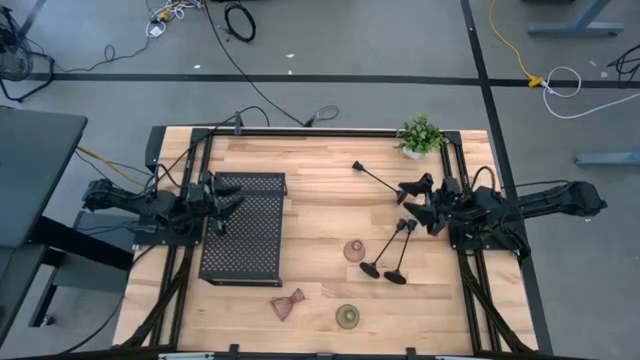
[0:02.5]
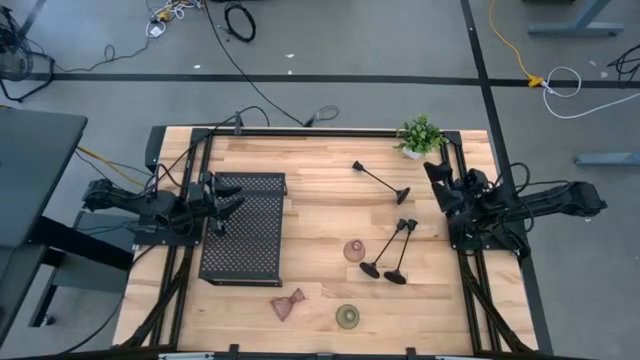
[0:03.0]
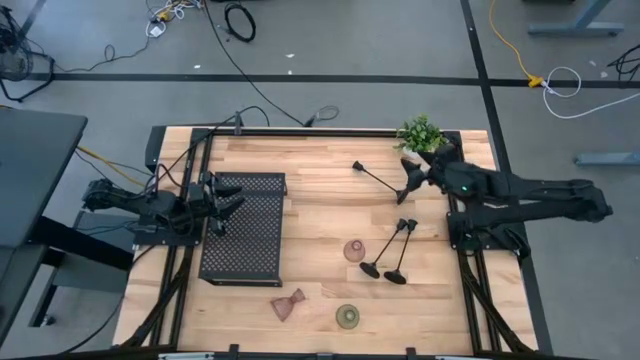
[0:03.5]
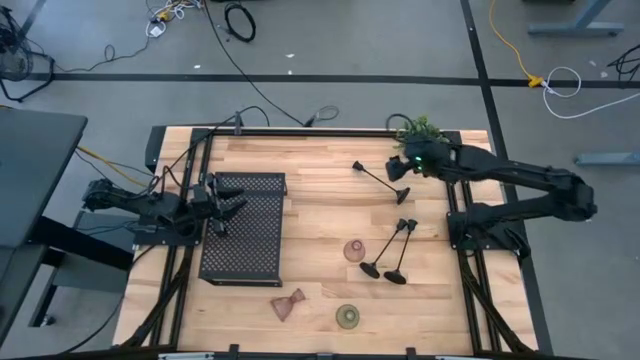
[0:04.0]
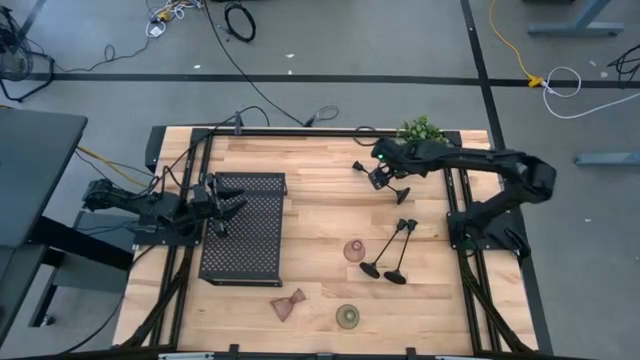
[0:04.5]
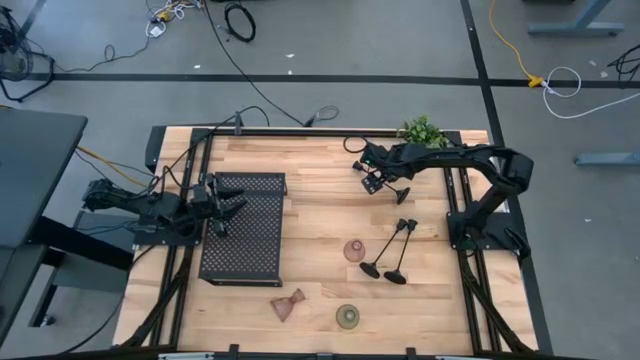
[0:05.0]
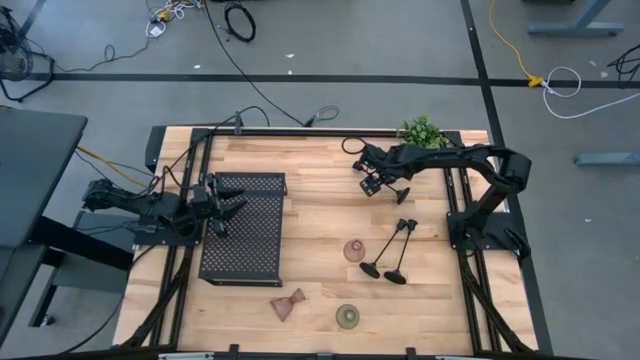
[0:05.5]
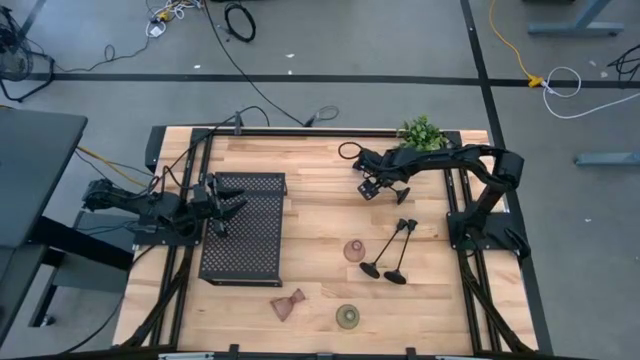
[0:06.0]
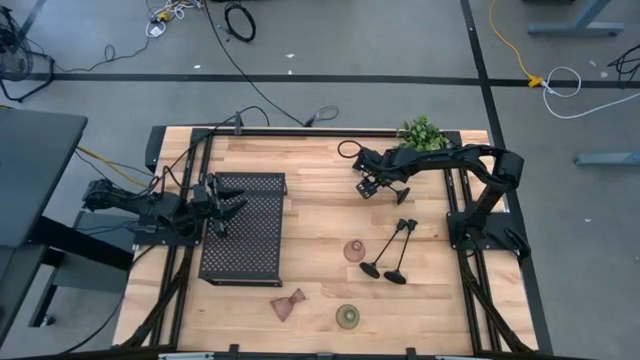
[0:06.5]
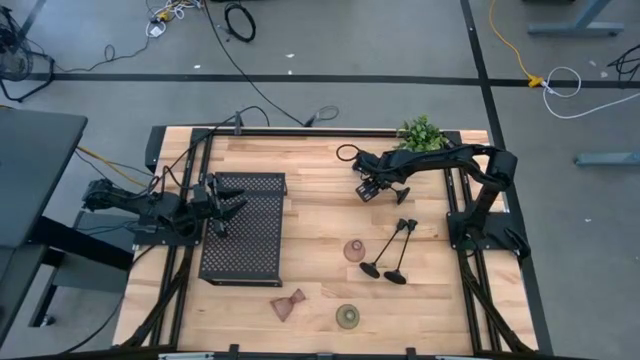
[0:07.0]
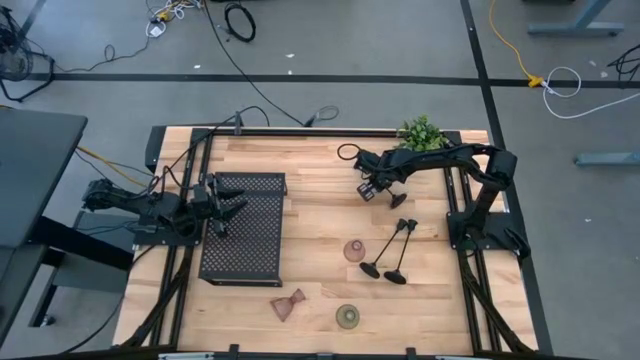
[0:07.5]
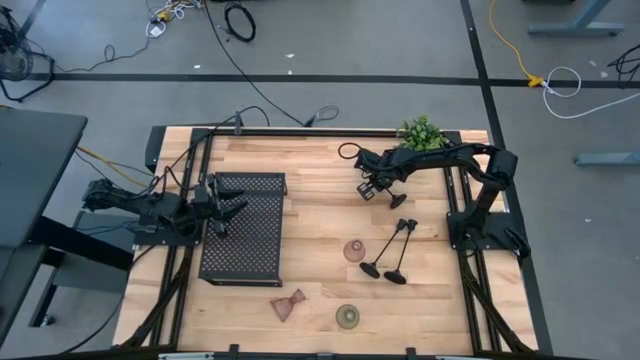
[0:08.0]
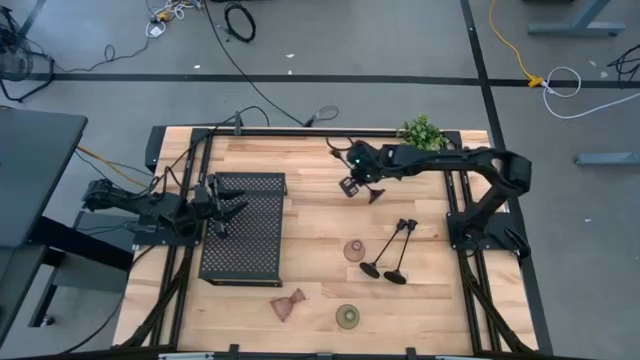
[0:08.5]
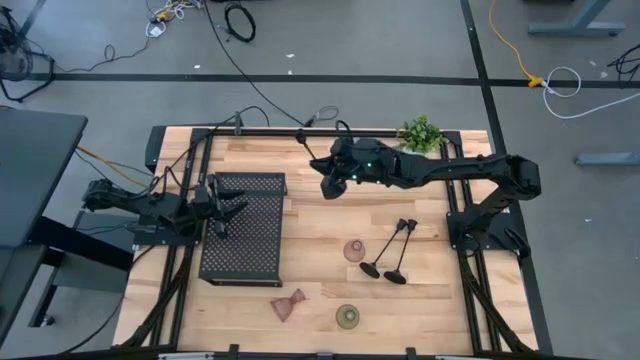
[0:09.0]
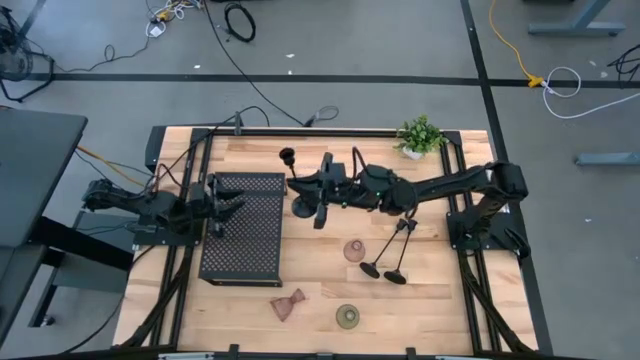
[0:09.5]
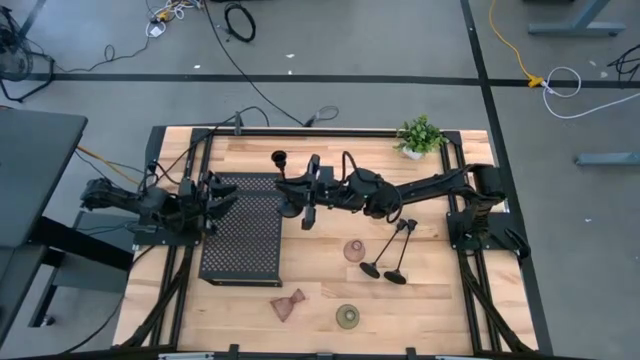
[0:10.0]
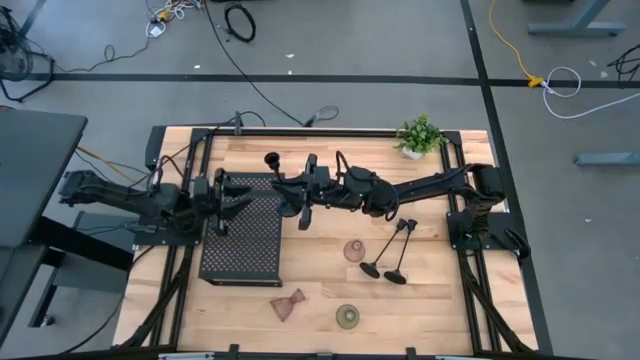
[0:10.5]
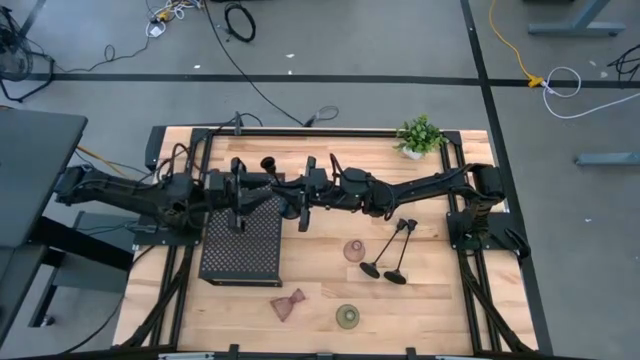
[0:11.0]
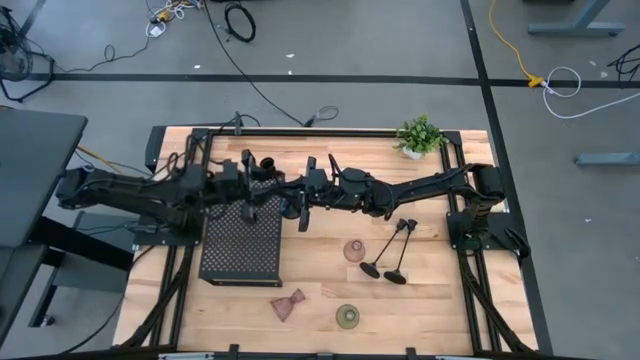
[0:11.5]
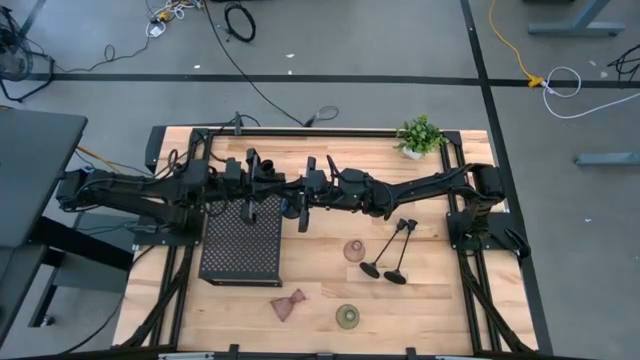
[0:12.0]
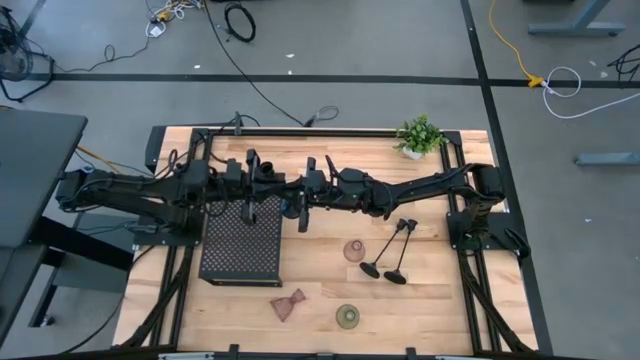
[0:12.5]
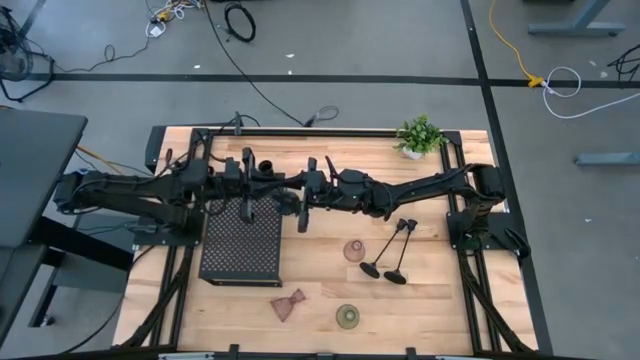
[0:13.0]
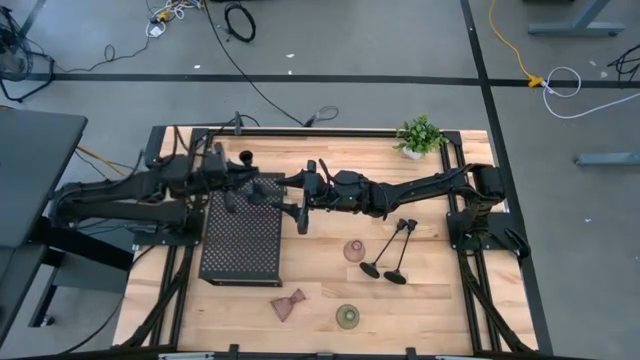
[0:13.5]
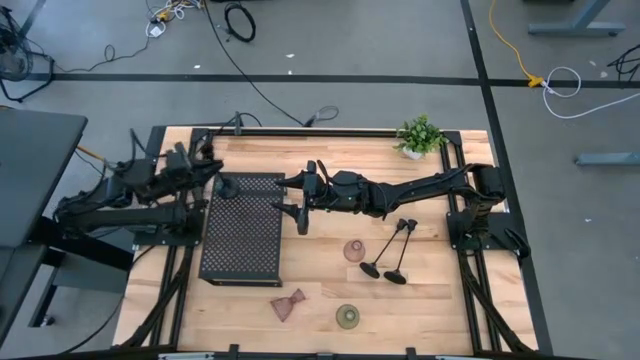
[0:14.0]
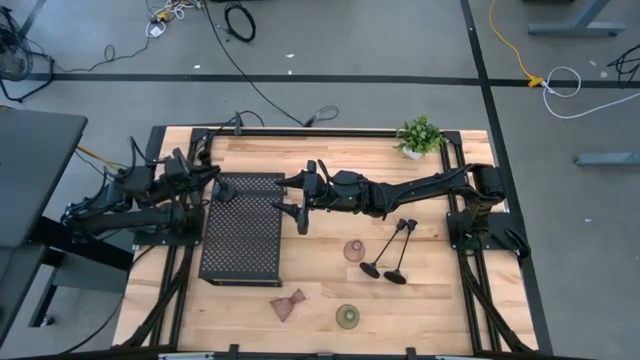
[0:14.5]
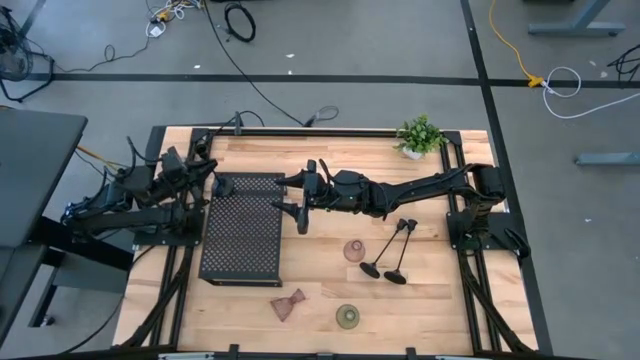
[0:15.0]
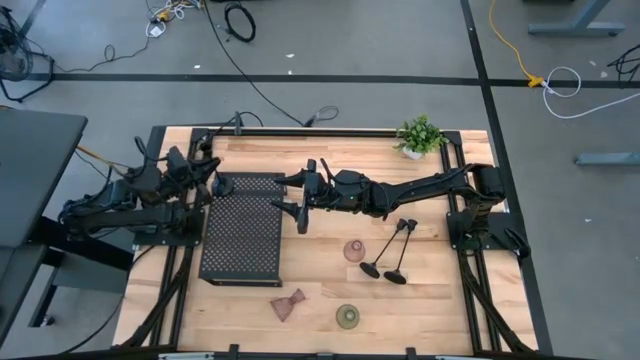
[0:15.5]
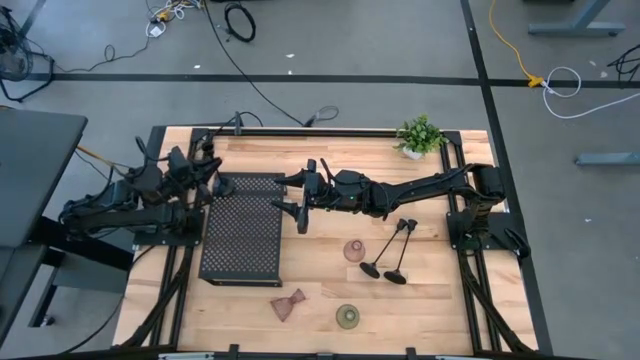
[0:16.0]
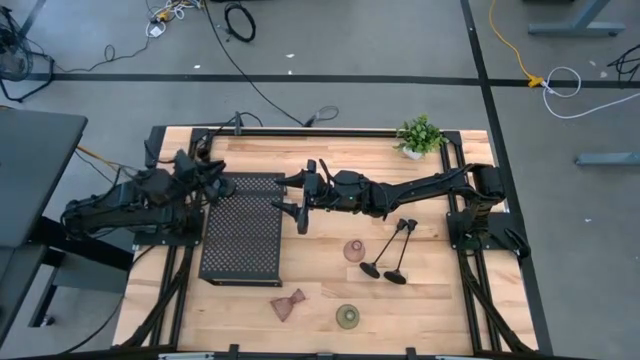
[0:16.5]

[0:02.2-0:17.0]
Task: Pick & Place candle stick holders
Put the top black candle holder on the shelf
